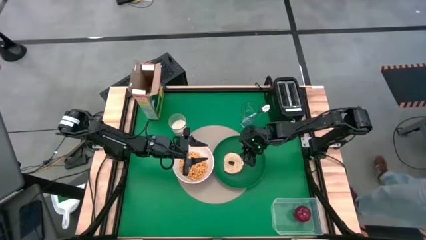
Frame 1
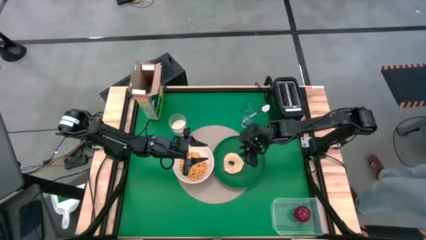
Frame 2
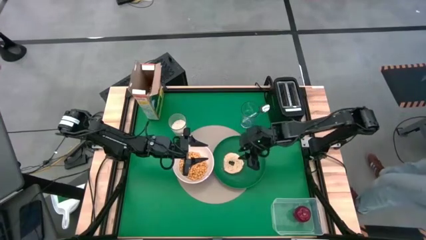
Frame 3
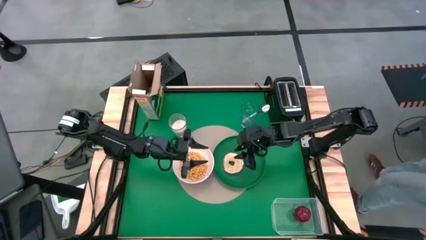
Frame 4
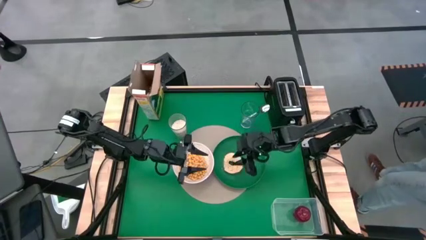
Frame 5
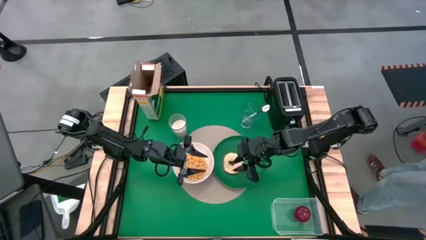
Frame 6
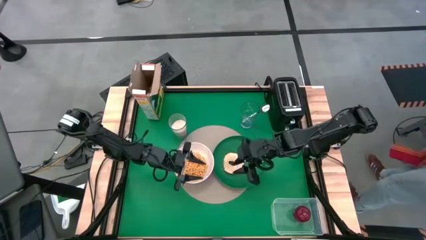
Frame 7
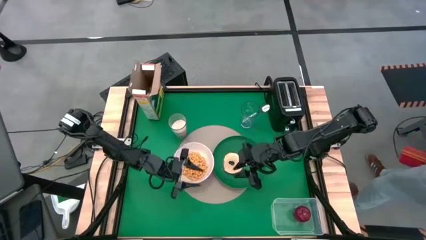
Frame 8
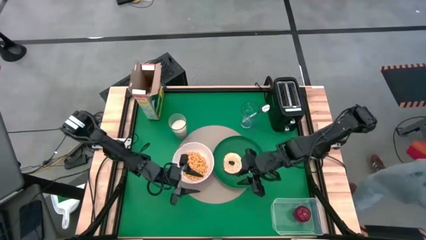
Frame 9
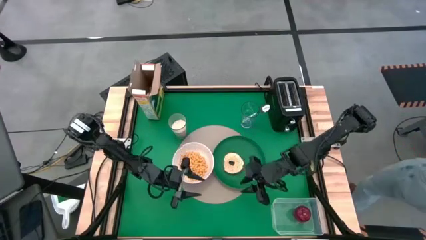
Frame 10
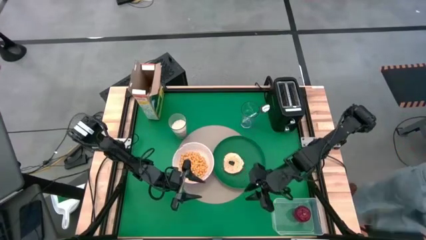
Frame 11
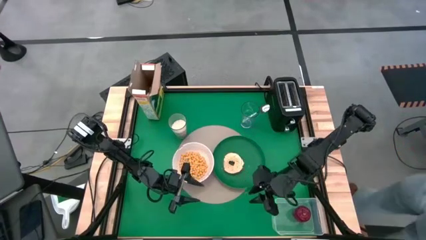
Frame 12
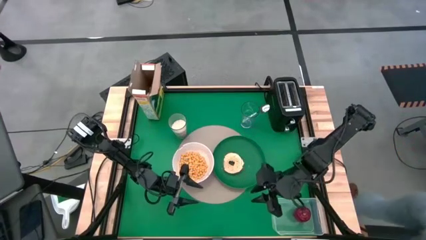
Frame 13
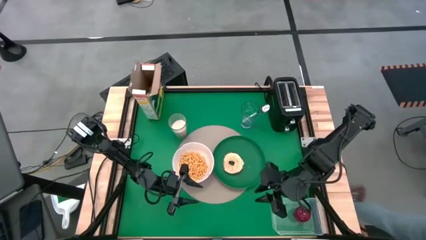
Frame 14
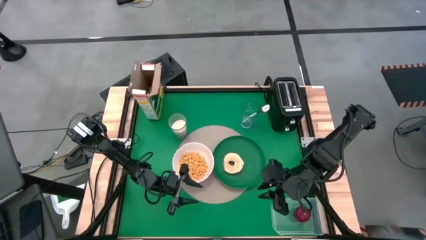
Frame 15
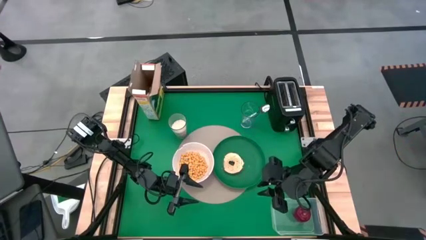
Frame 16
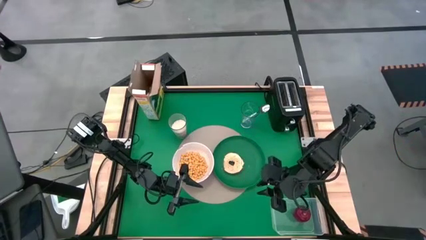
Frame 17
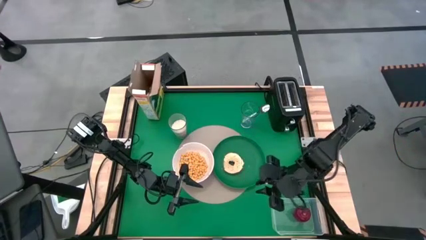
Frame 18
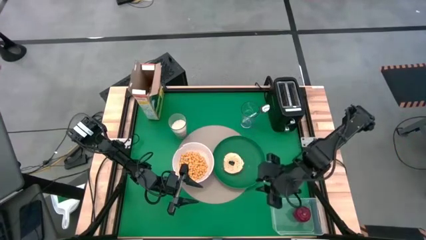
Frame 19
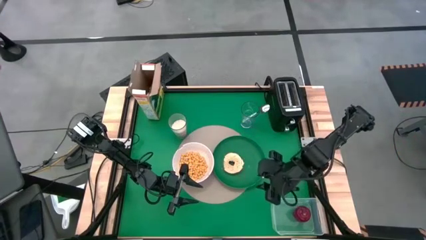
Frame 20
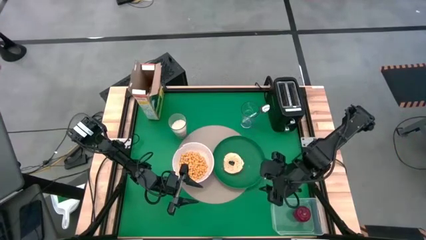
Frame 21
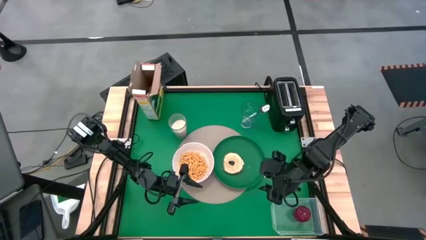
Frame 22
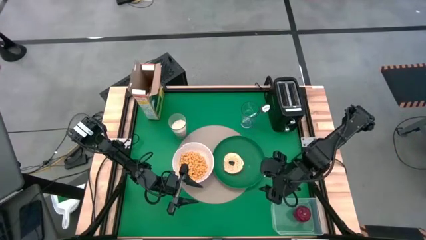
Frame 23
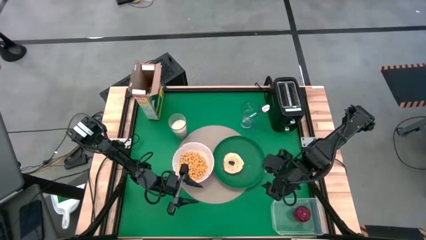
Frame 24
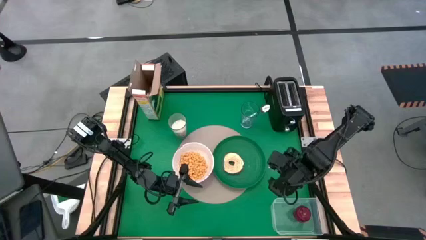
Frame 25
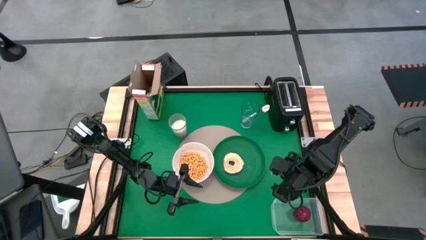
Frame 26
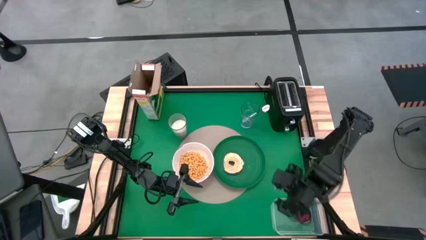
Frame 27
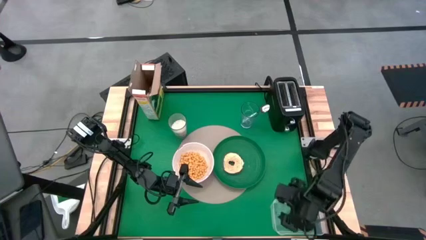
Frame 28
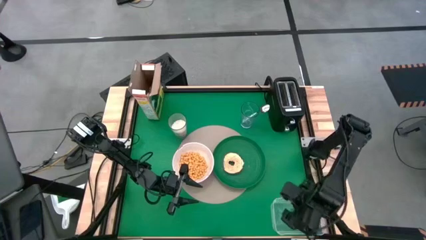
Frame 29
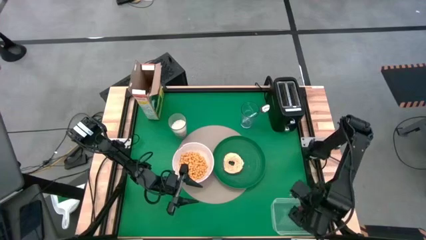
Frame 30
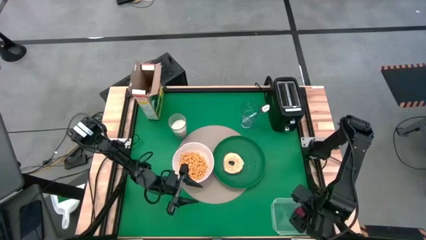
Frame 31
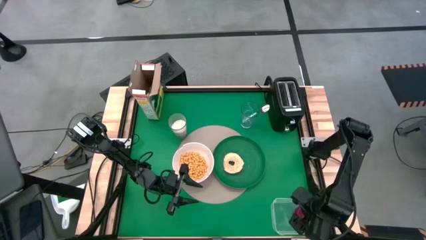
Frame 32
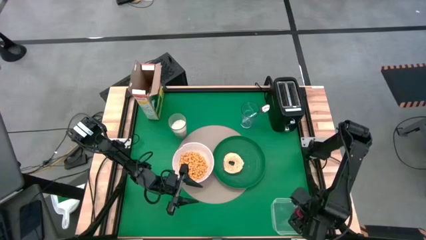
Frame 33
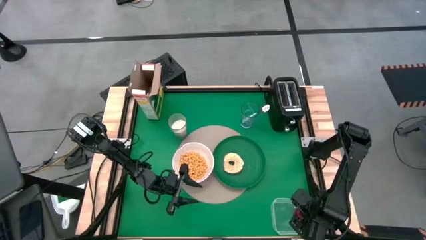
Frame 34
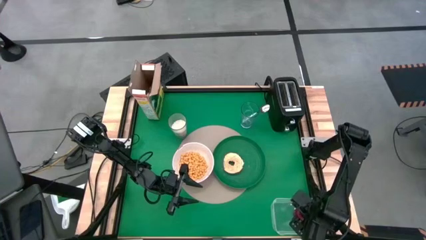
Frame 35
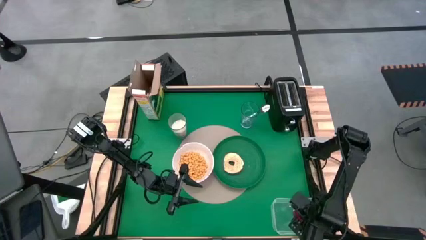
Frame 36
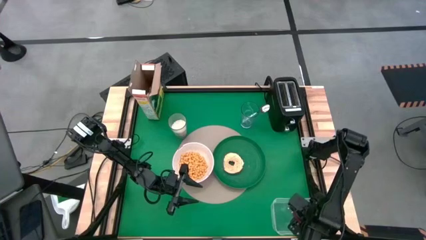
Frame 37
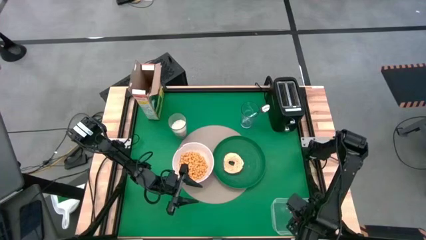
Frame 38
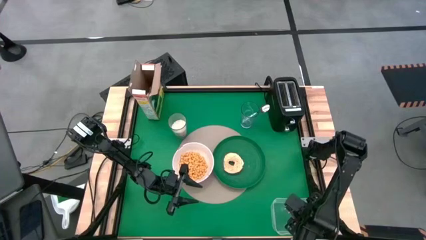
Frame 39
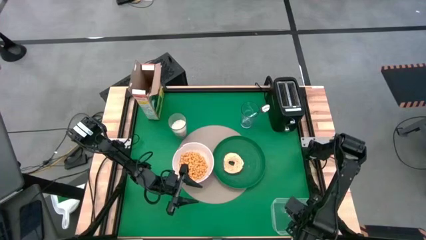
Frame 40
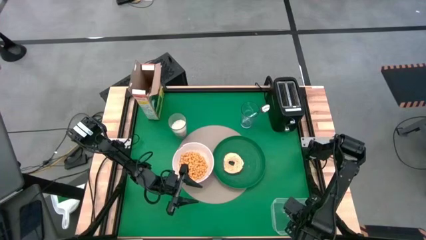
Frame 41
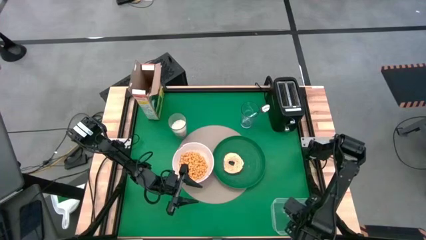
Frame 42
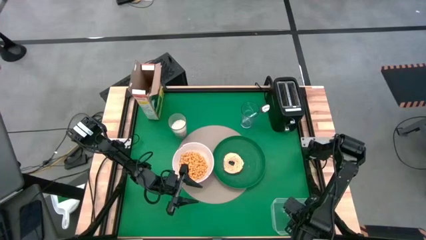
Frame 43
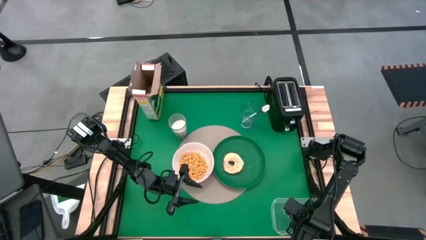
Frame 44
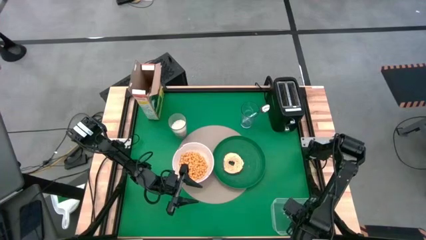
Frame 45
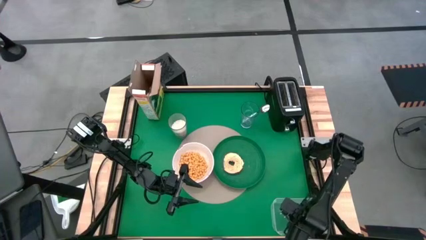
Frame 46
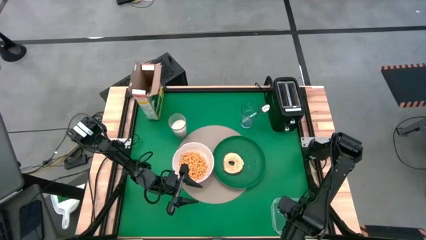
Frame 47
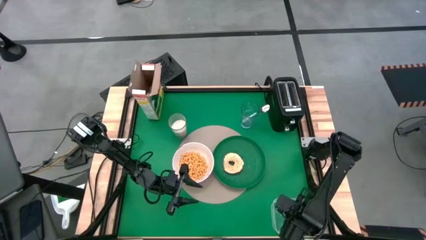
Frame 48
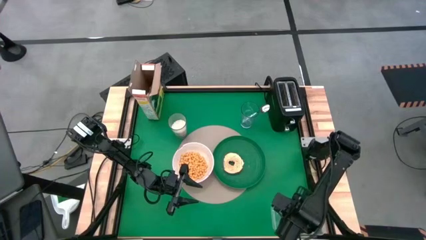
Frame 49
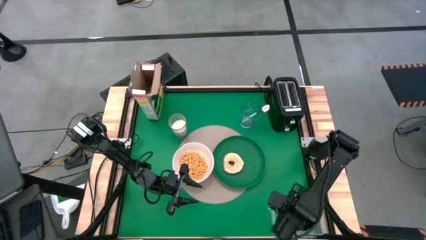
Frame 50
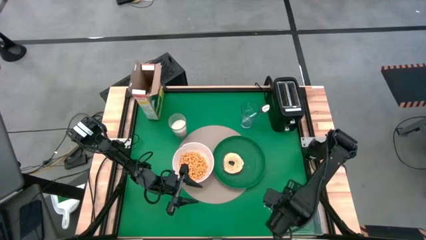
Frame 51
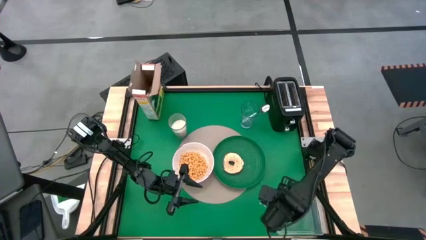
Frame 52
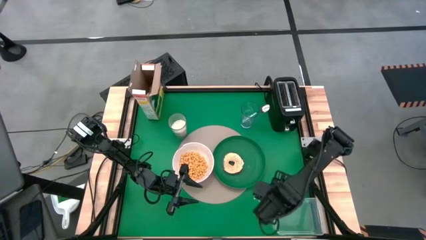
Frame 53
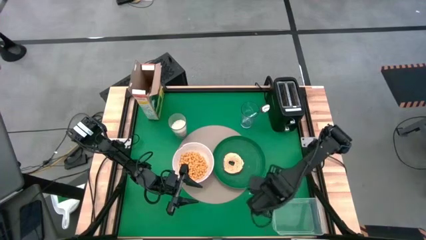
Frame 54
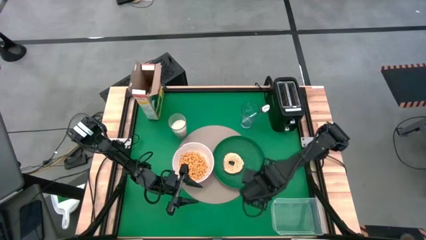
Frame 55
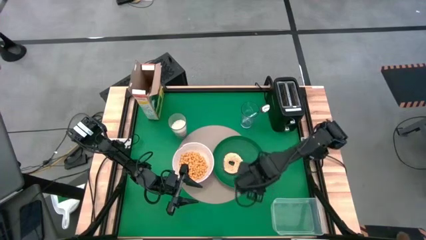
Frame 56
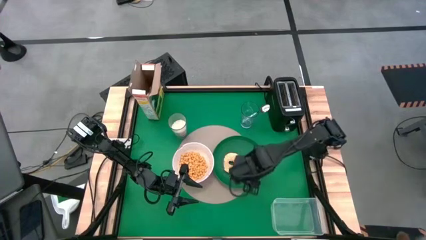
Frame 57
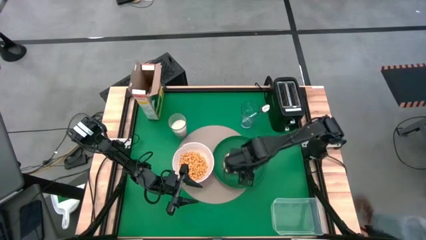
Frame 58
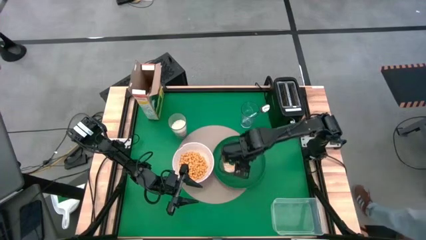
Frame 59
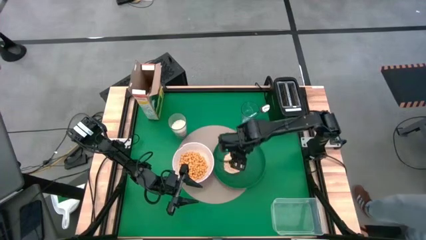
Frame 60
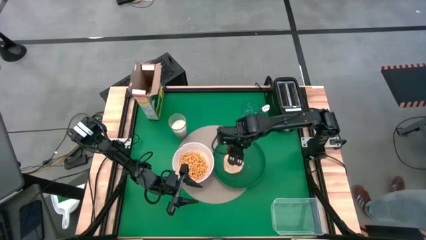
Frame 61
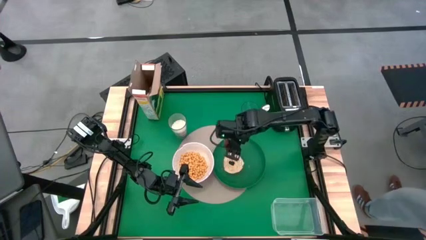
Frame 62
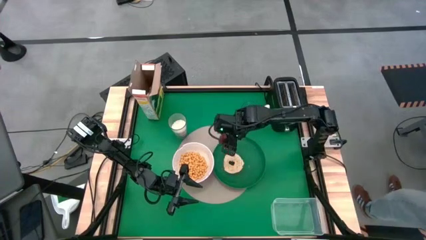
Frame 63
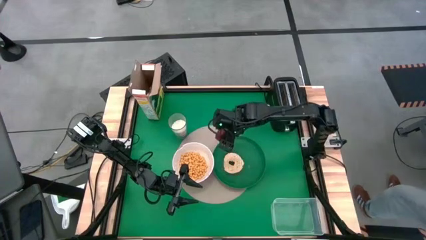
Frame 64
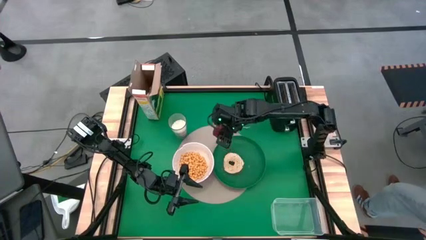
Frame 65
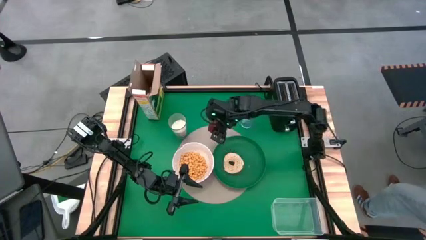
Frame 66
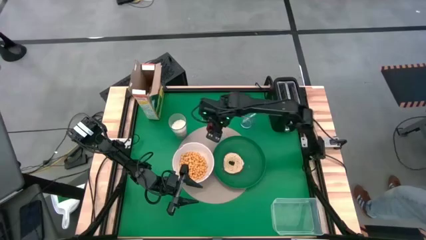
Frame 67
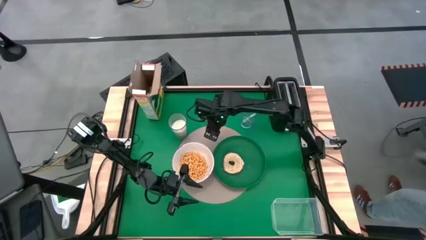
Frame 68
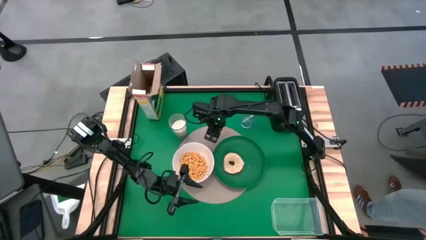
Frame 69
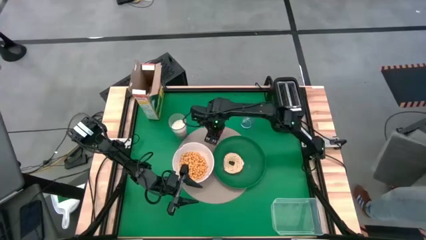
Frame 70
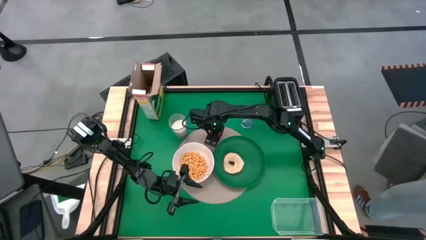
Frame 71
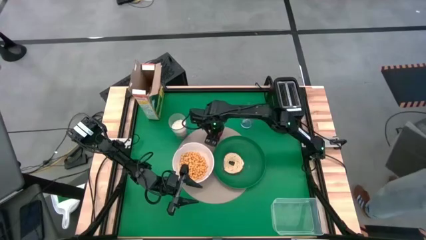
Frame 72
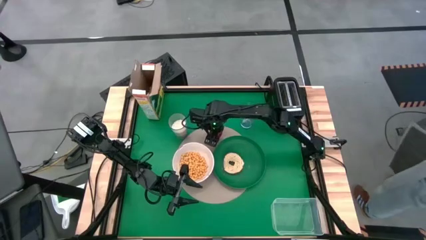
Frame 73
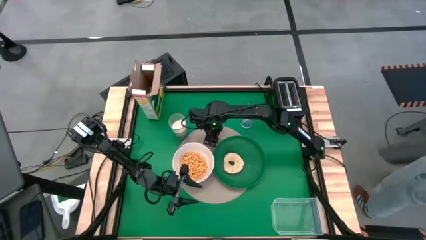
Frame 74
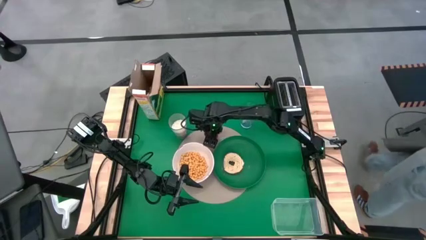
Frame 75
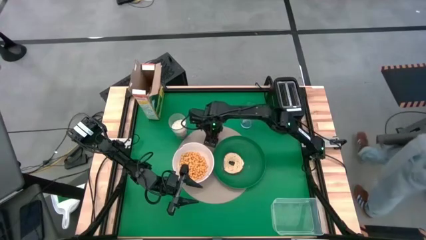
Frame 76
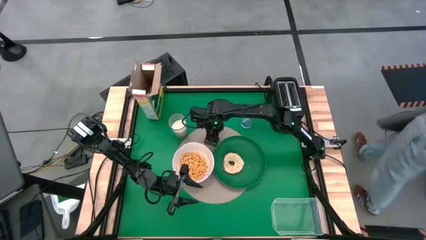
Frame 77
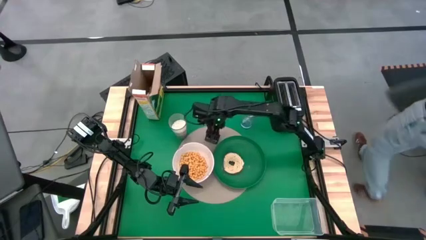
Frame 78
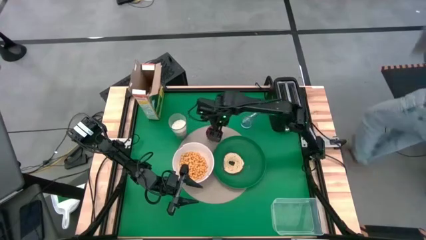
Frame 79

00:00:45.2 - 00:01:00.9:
Task: Arrange a breakfast setting
Put the apple on the table mat in the middle between the bowl and the green plate
